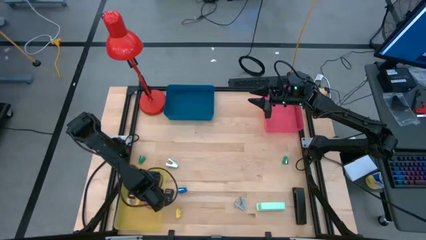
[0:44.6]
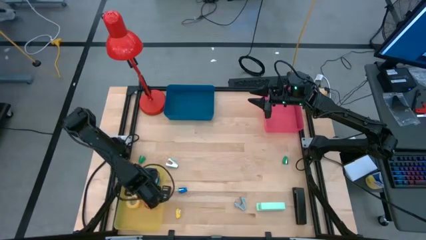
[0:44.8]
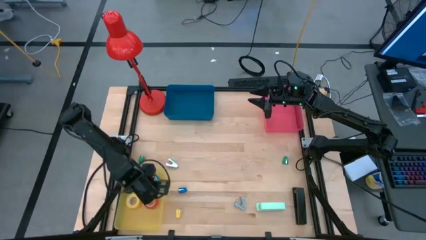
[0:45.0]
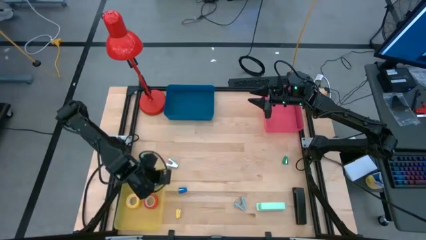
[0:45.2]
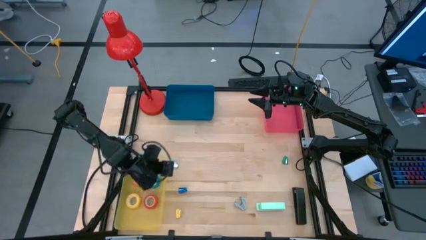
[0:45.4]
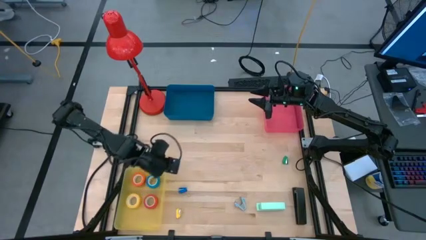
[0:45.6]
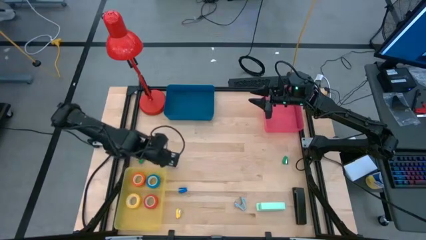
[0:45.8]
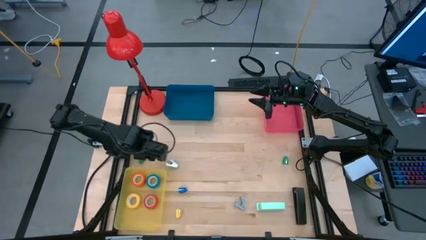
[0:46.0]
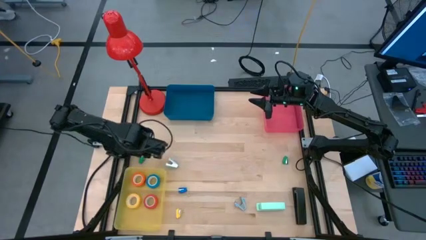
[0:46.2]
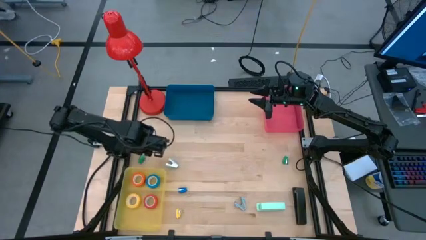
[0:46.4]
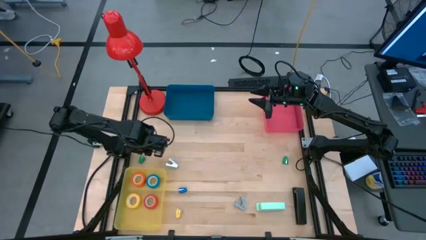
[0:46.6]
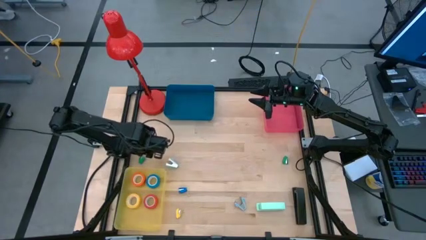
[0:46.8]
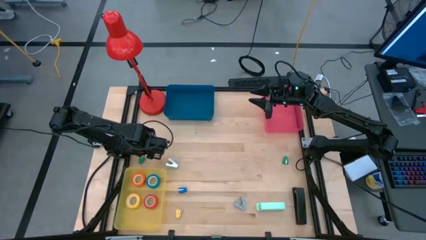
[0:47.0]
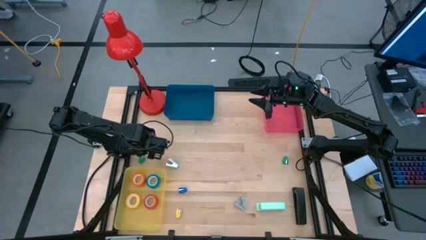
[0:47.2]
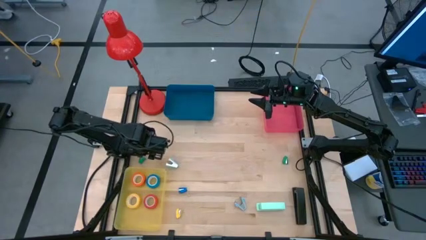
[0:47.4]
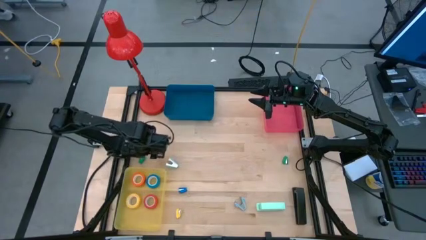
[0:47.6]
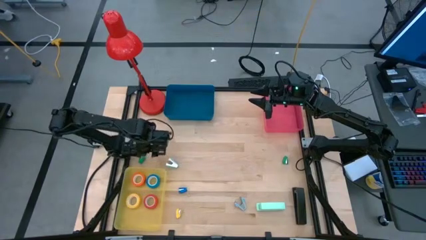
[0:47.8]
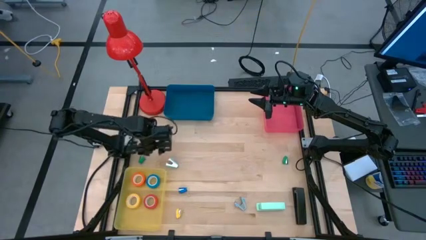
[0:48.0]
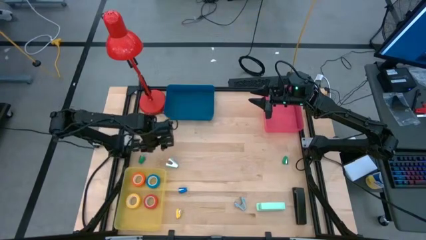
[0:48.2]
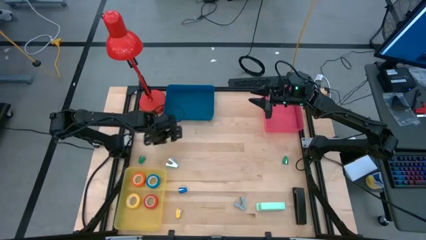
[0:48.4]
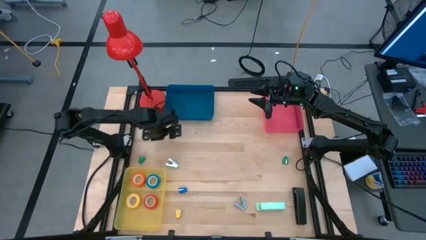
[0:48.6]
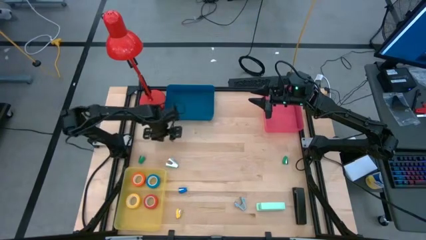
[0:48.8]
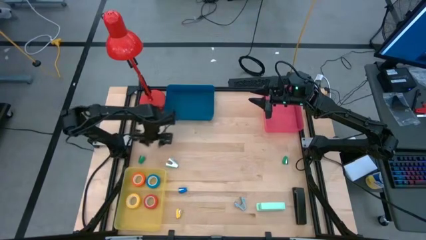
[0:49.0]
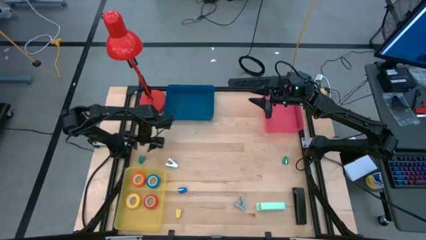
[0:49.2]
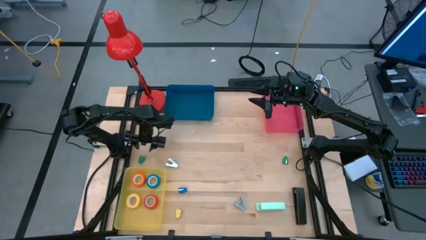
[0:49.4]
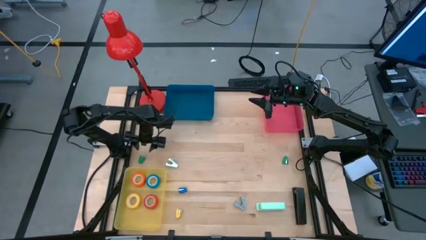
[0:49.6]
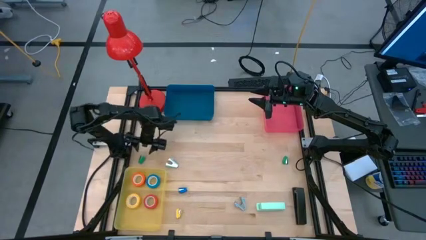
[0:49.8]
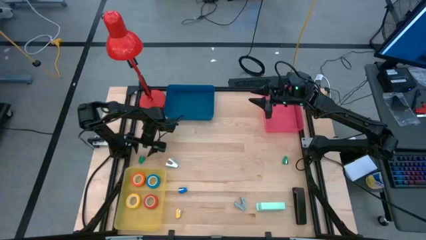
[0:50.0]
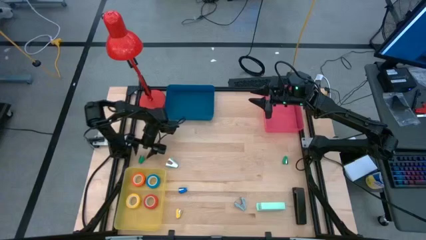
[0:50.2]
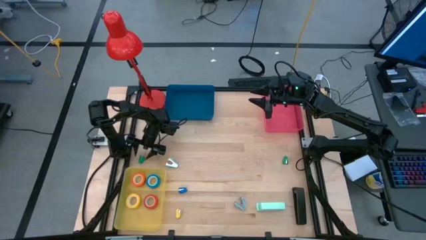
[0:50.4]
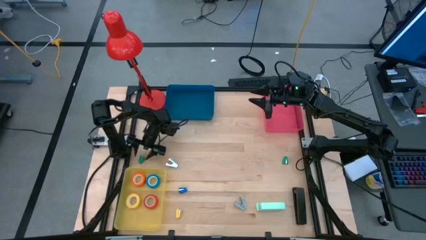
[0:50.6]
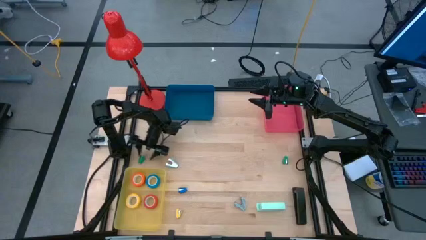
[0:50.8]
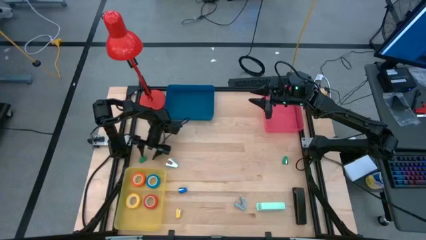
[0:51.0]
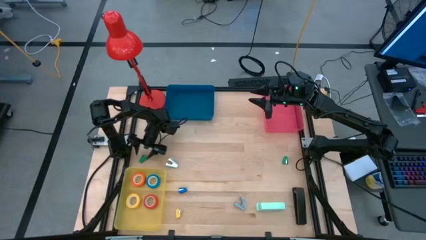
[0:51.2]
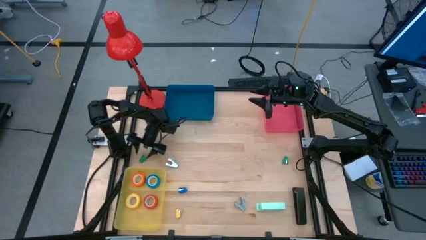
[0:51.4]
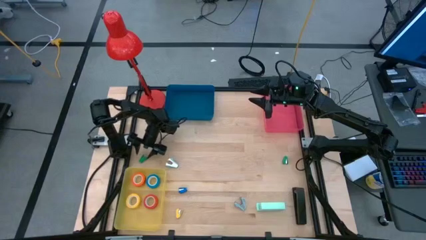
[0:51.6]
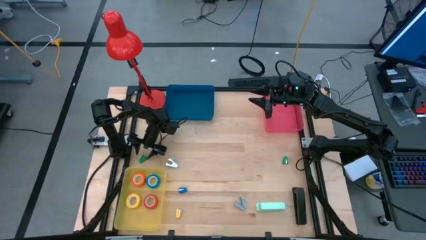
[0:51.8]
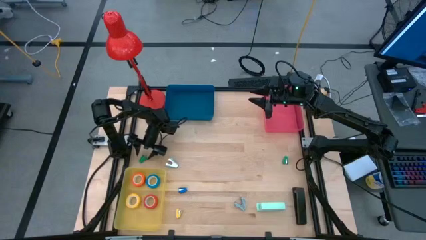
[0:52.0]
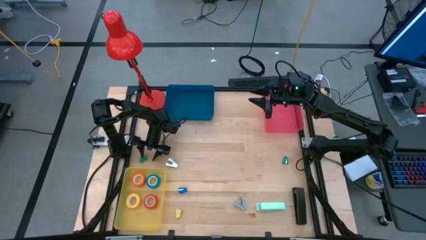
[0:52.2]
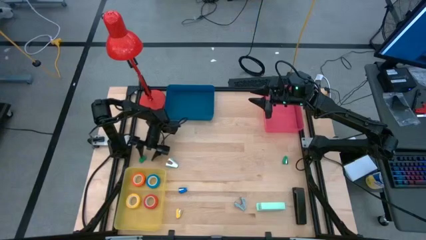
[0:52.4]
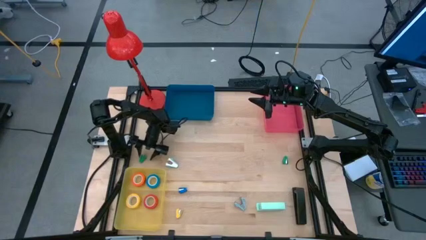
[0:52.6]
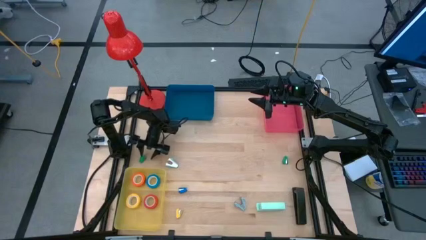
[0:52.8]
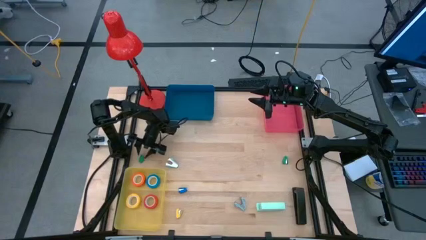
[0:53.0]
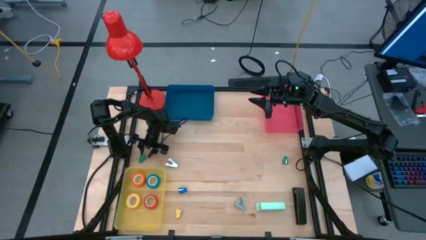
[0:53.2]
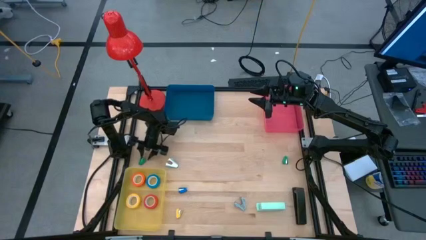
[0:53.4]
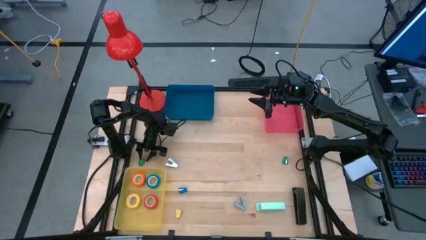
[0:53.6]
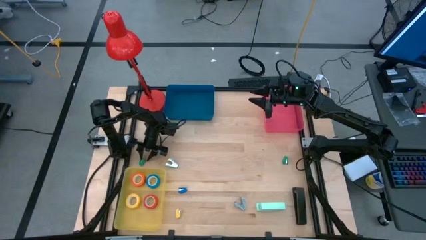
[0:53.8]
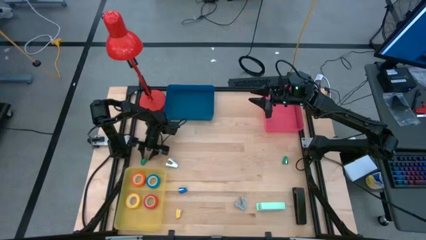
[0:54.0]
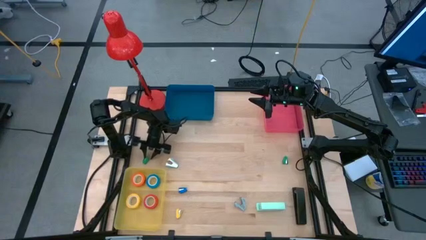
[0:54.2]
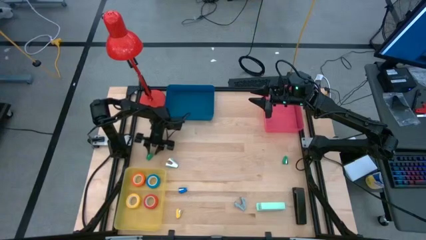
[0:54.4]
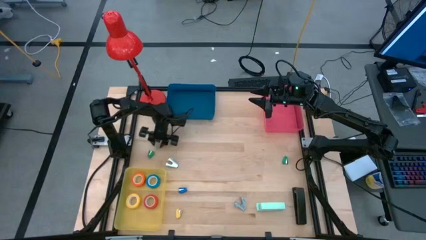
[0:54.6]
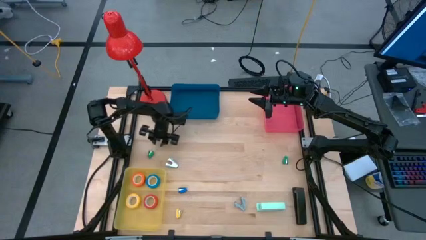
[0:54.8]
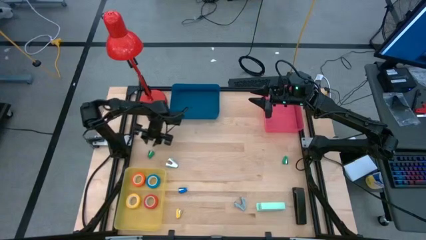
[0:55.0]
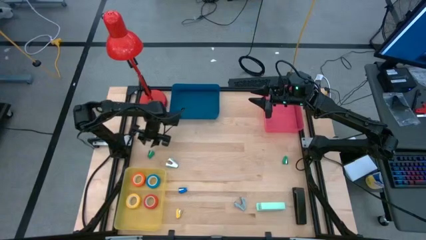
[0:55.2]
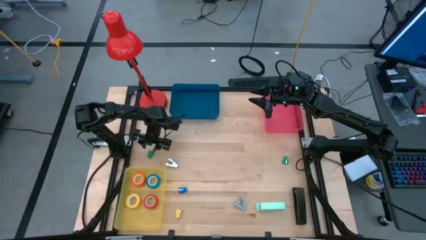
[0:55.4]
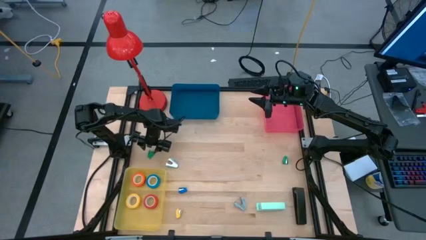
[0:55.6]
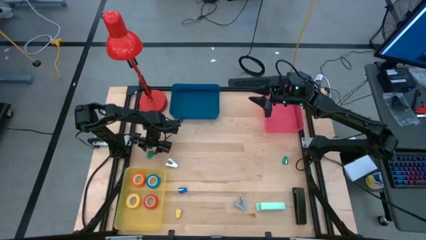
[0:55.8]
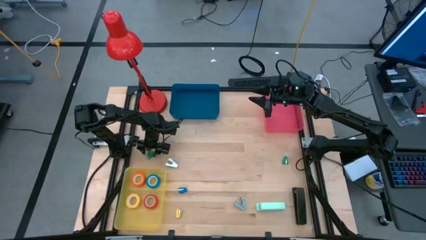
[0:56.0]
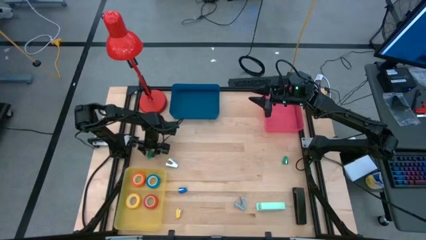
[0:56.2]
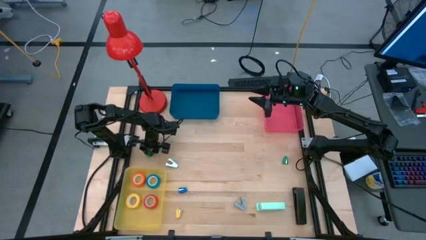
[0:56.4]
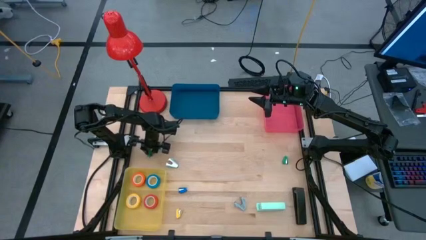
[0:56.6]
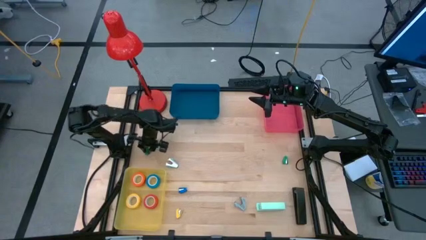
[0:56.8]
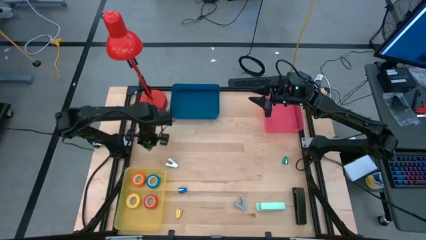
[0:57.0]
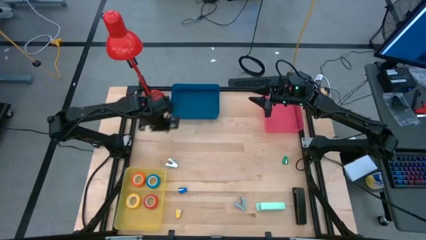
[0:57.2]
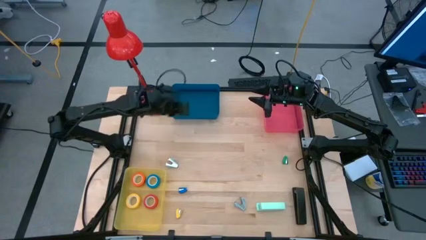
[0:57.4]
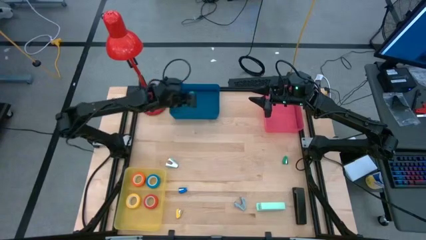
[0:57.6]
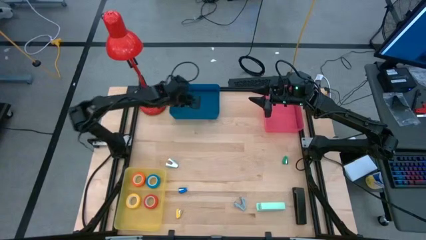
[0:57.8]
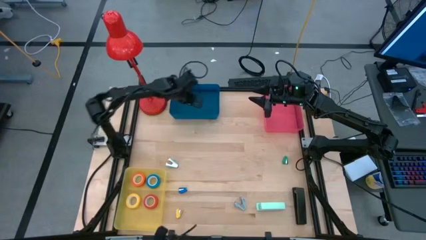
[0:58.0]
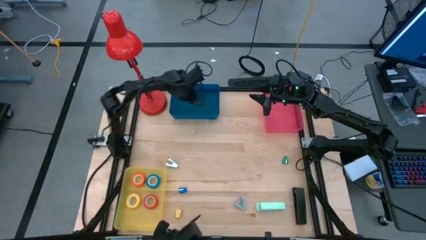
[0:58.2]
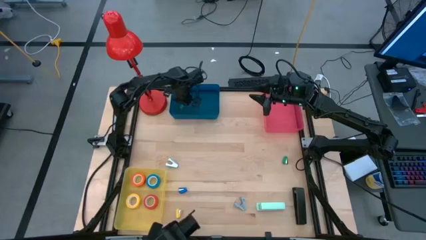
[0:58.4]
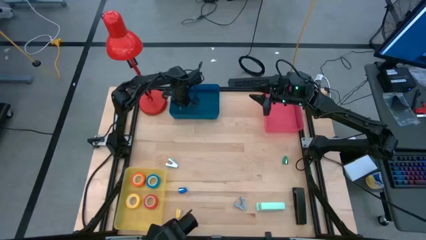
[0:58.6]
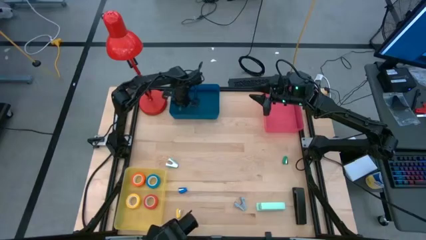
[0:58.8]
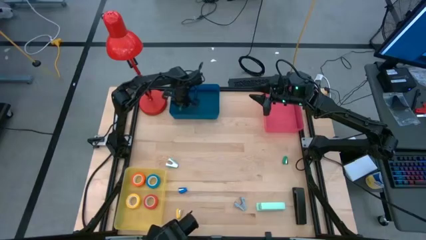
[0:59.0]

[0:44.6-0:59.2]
Task: Pick and place Stapler, Stapler remover, tape
Put the left green stapler into the blue bin

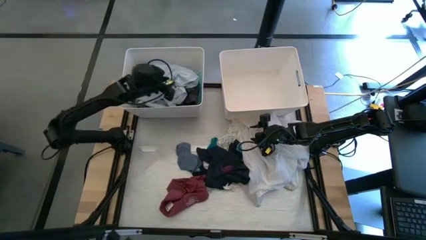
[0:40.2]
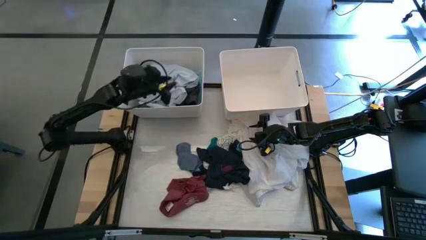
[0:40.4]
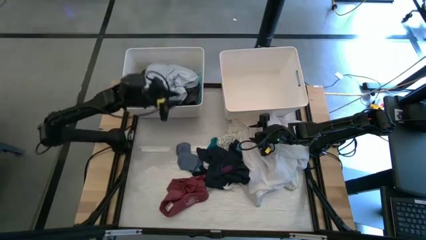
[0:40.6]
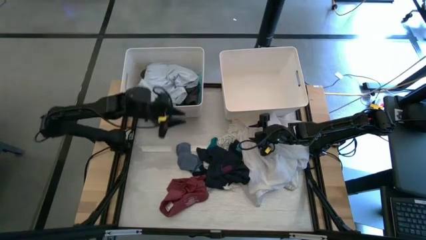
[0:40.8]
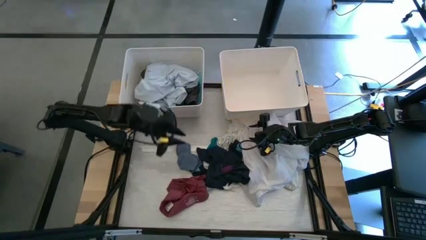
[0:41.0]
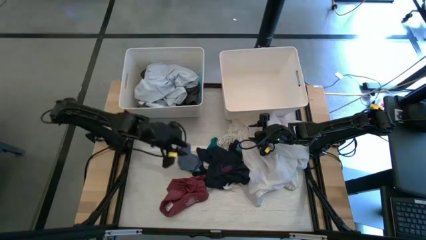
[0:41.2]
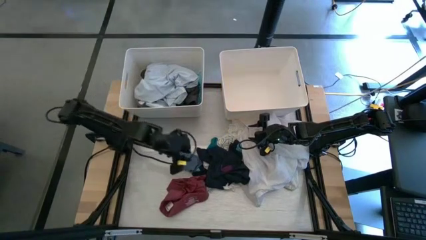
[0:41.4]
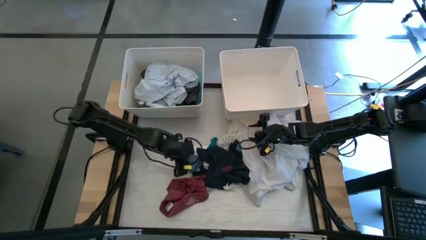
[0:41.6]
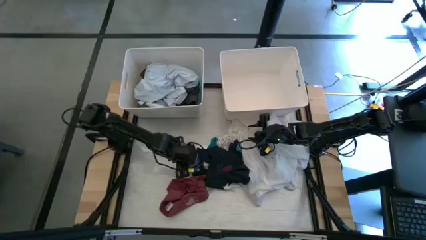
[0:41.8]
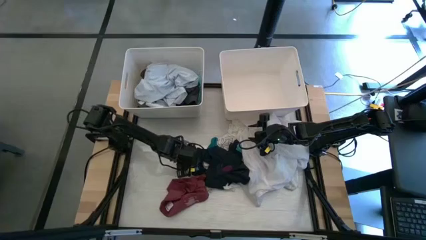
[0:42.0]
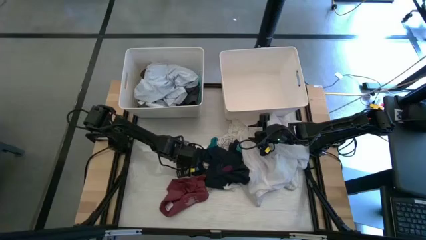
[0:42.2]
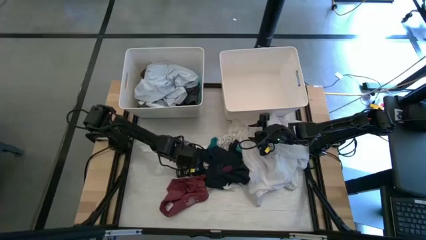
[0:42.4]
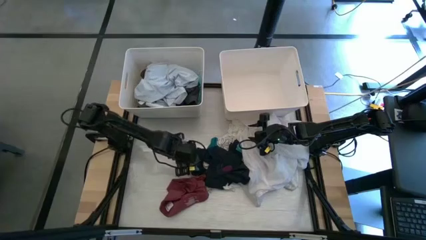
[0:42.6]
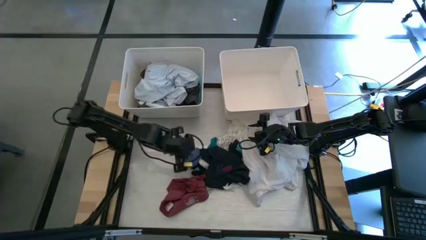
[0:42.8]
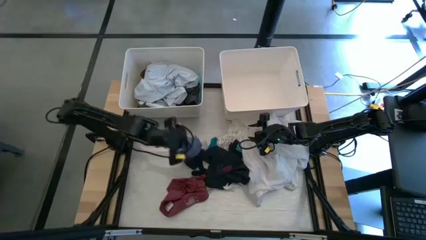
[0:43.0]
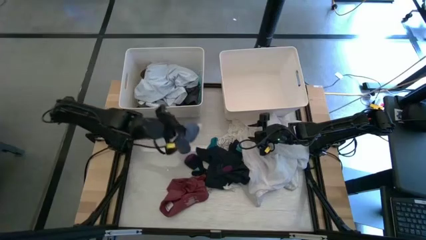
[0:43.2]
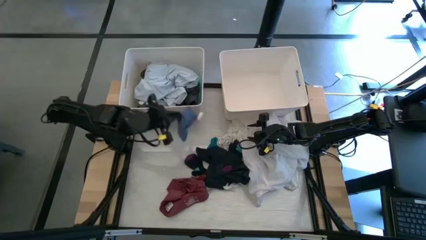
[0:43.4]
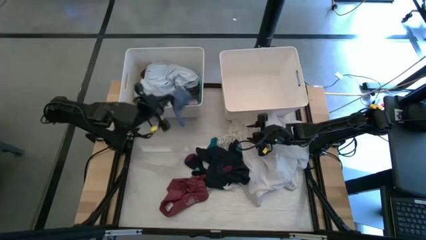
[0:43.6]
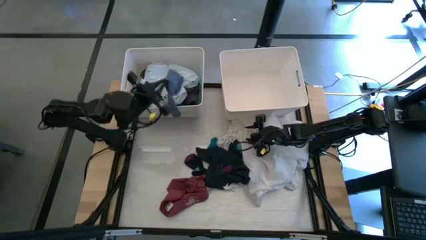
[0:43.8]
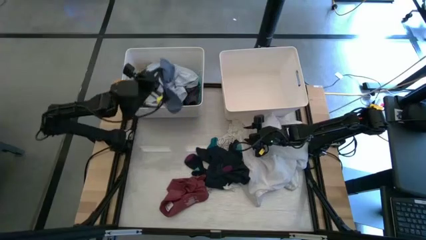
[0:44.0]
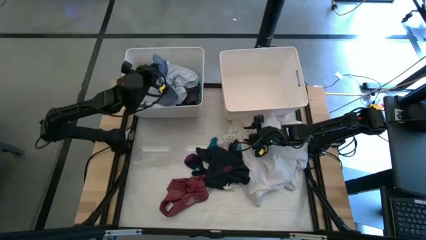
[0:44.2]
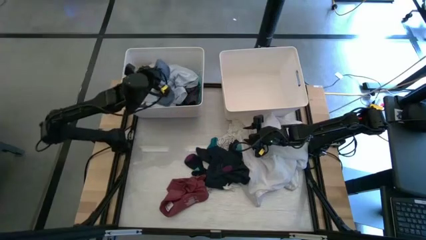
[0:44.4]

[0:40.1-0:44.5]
Task: Sort clothes
Put the blue towel into the left white laundry bin
